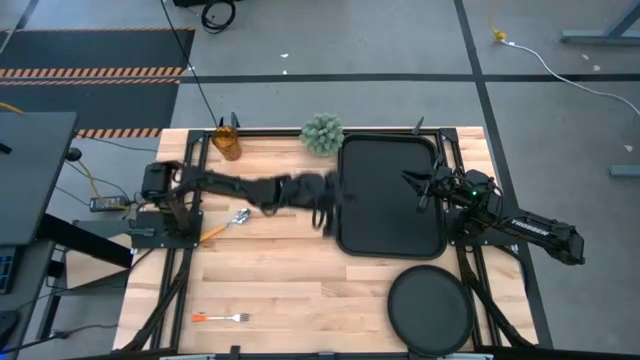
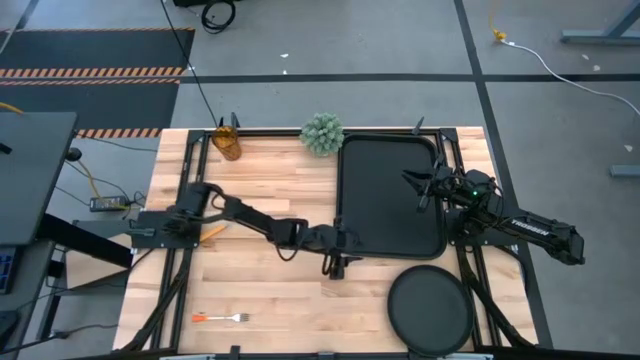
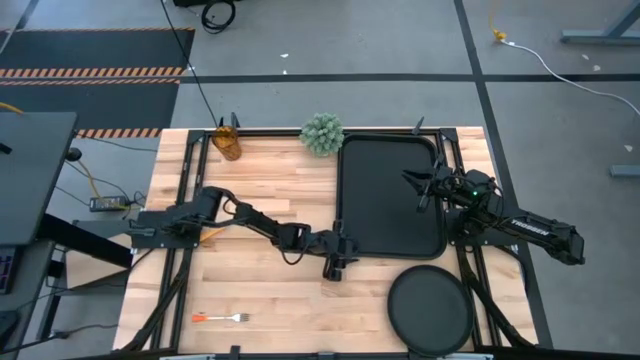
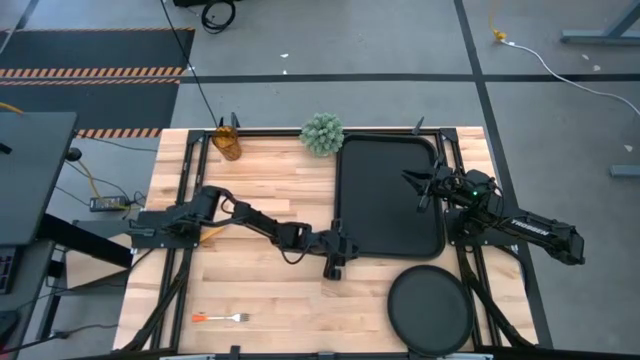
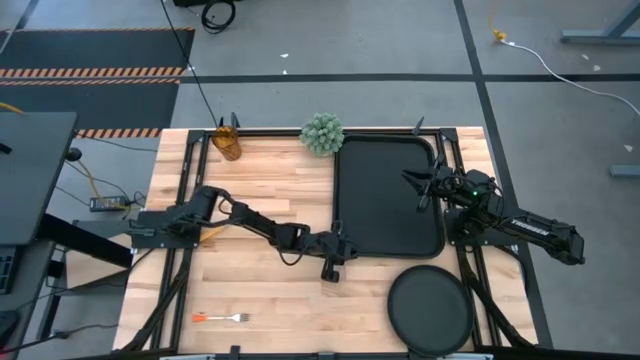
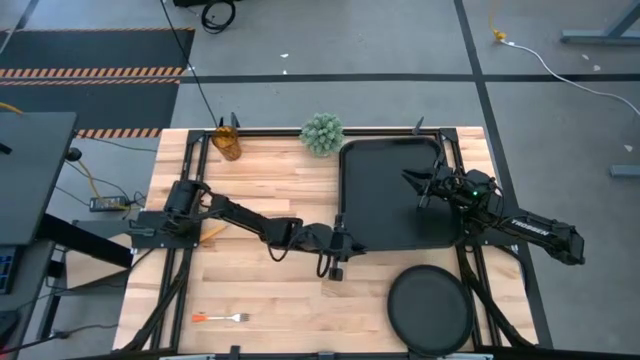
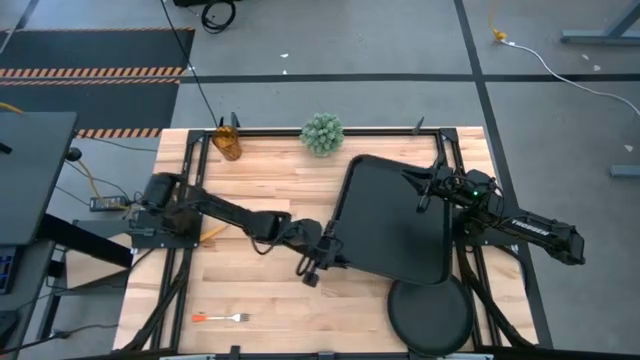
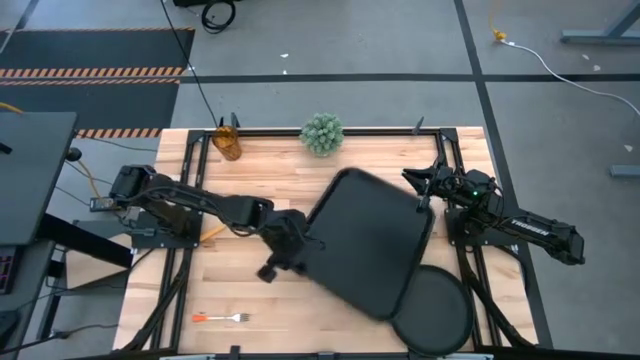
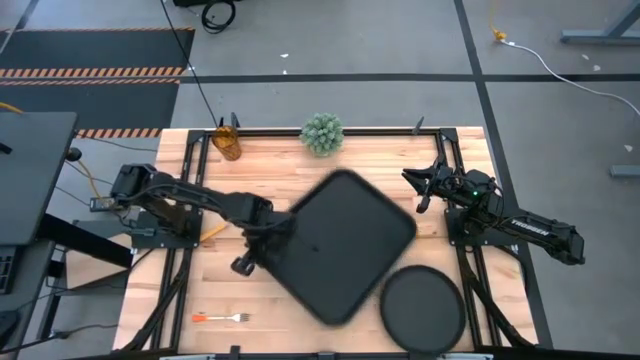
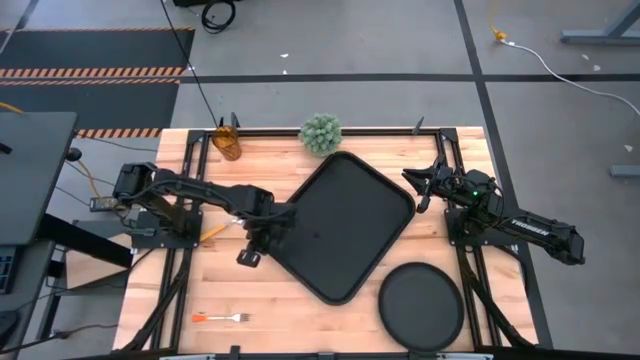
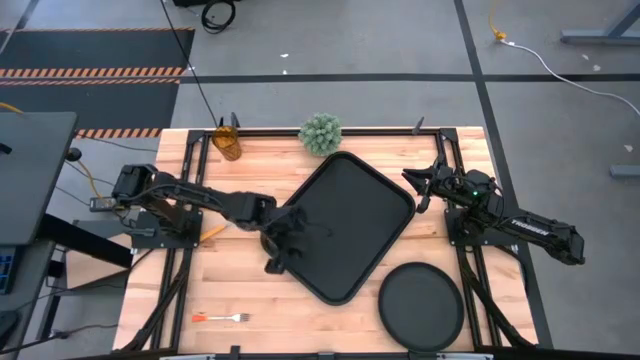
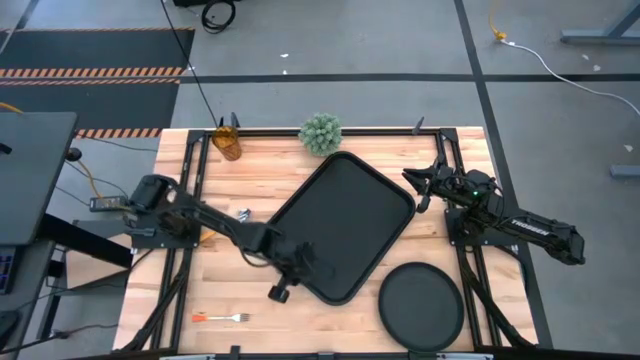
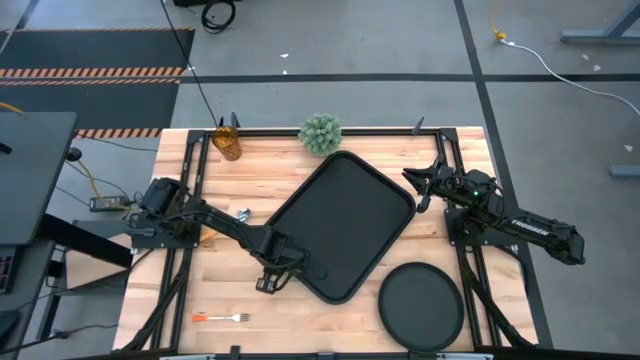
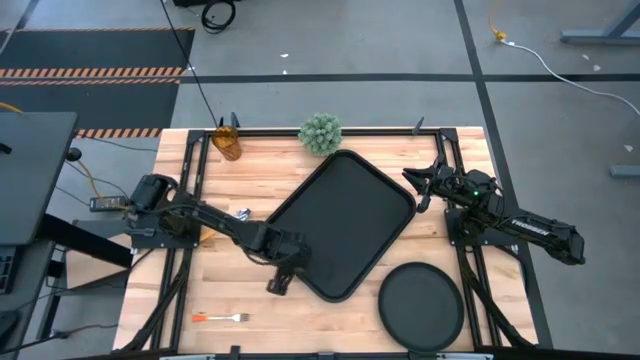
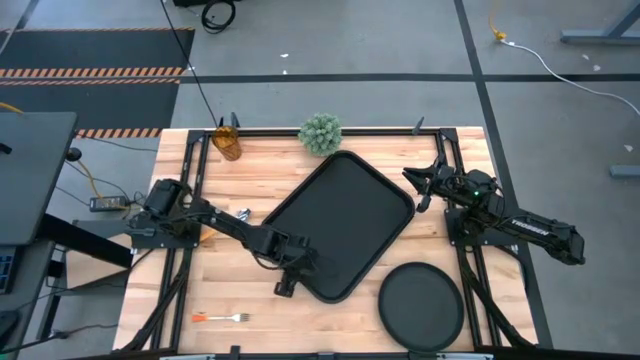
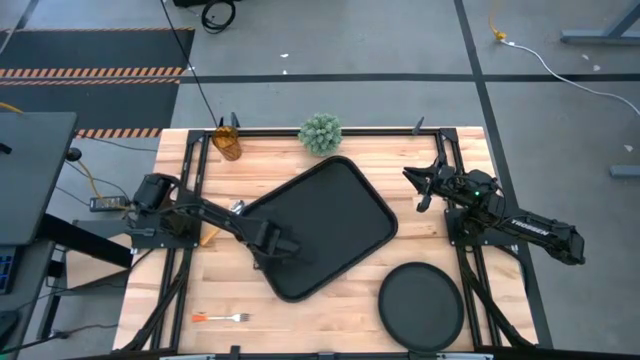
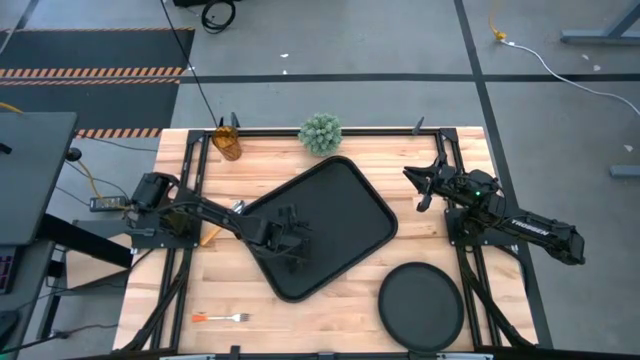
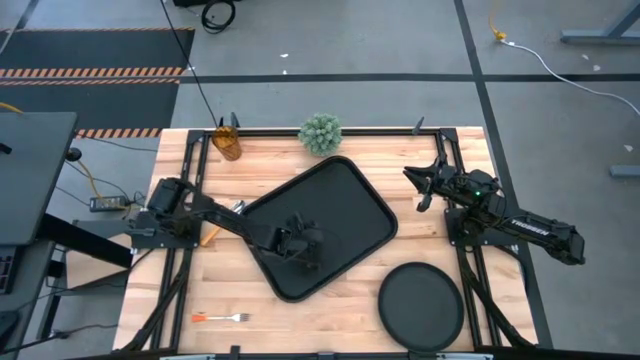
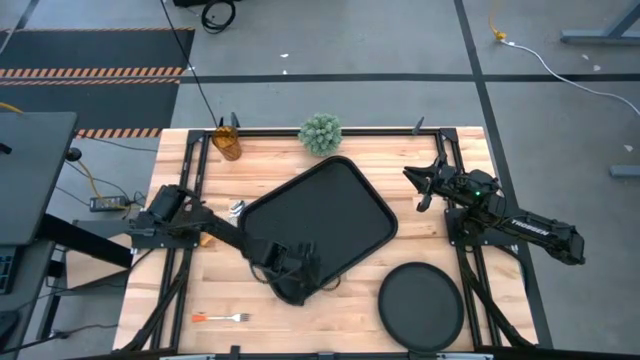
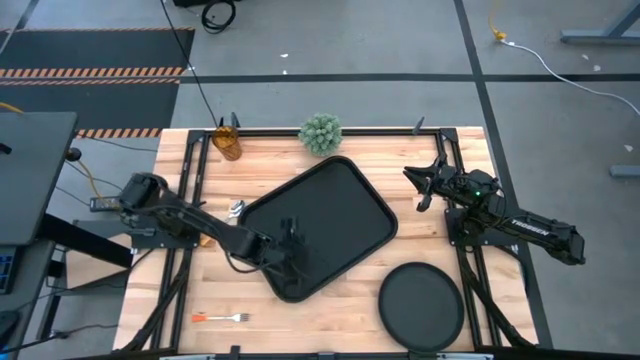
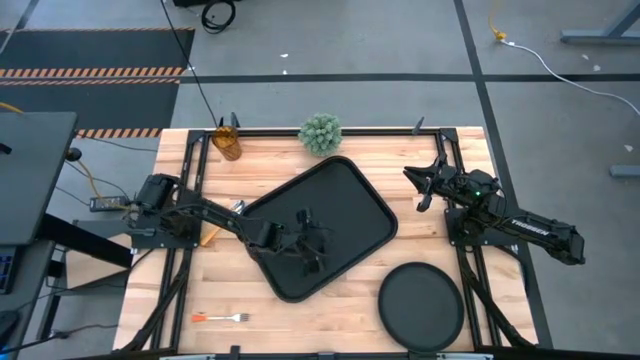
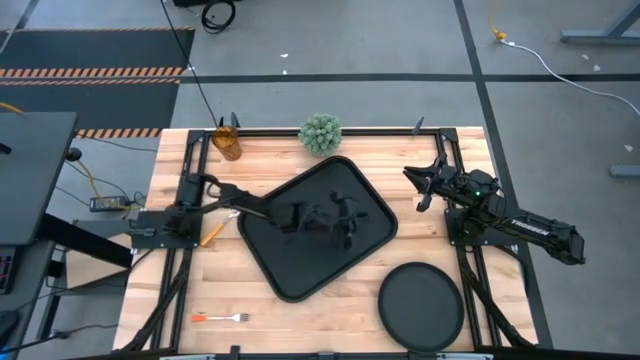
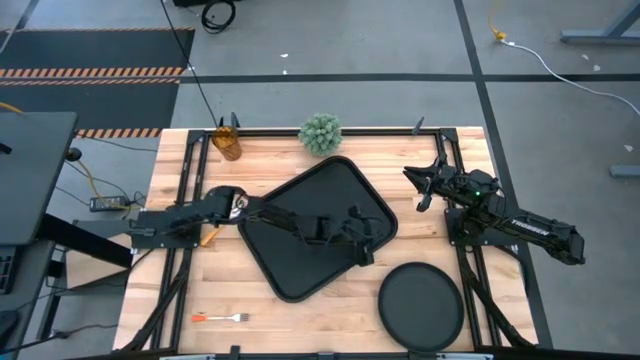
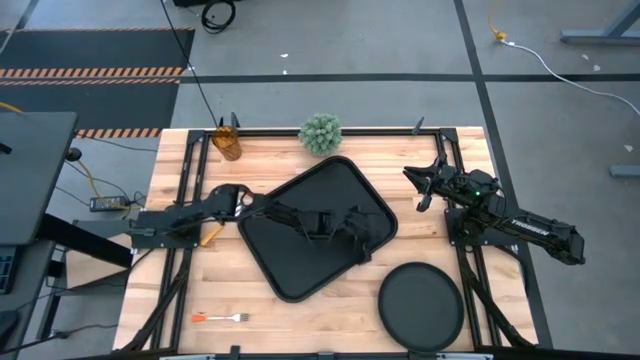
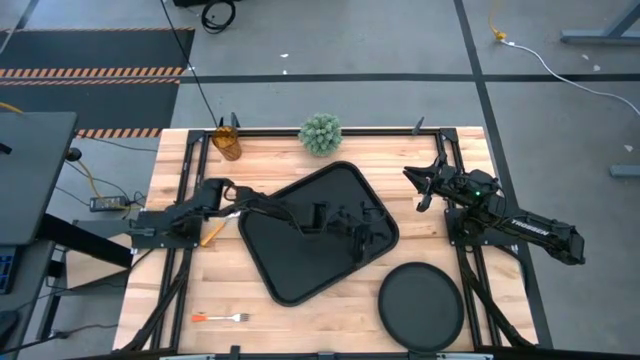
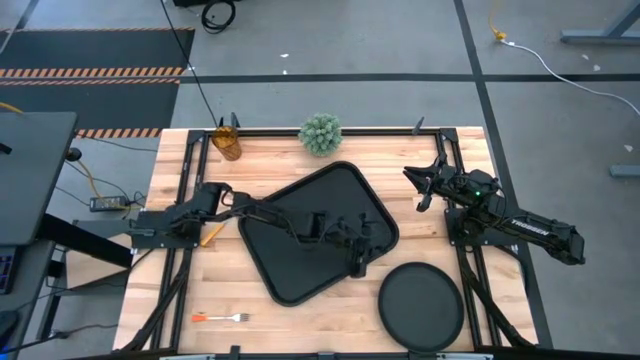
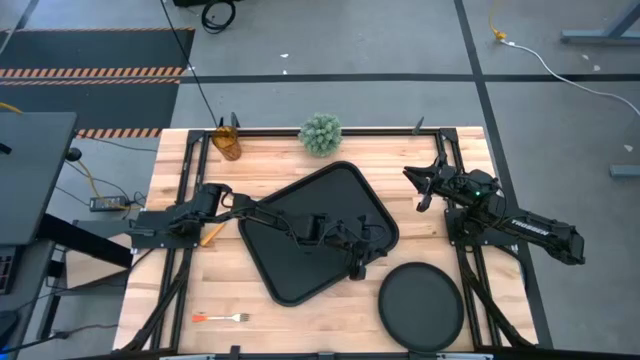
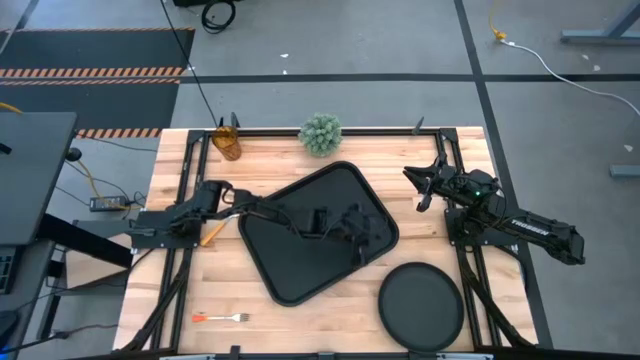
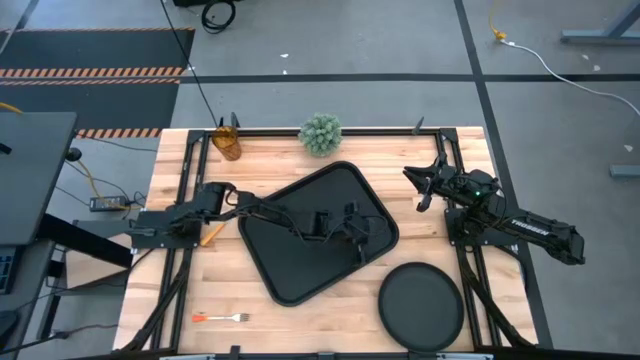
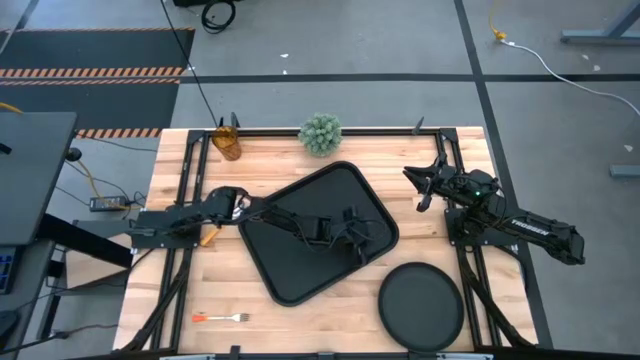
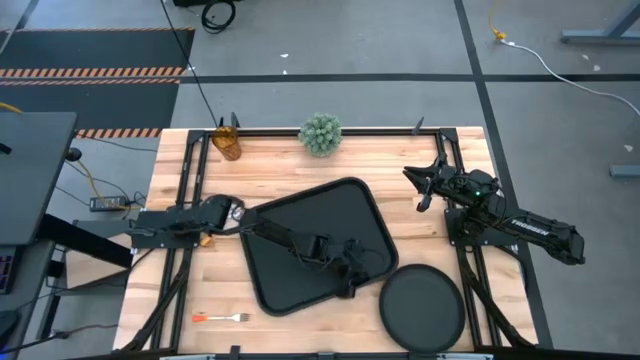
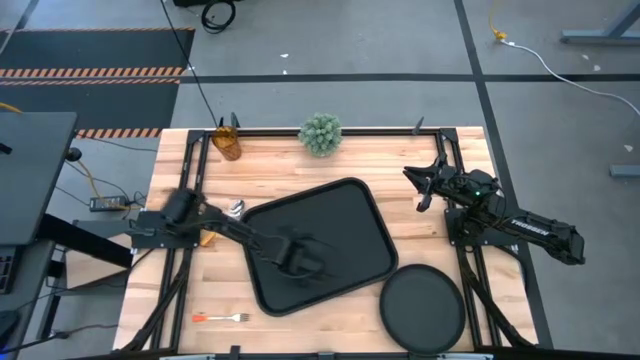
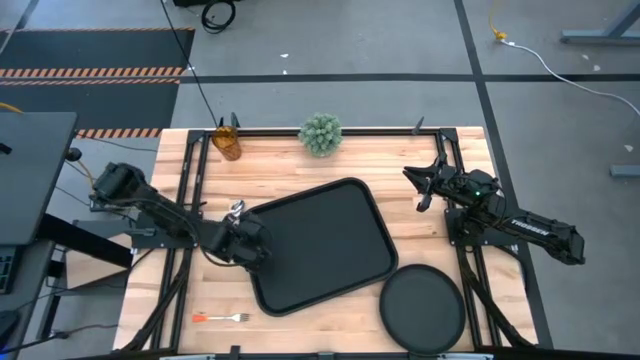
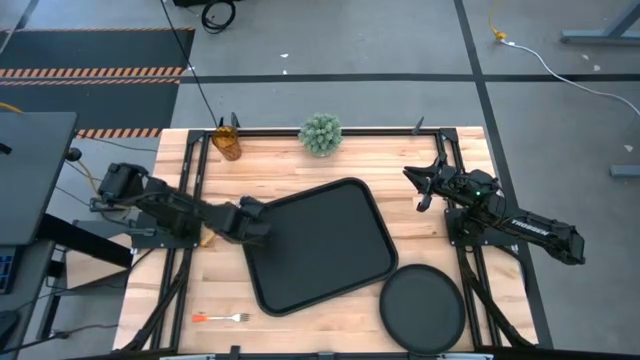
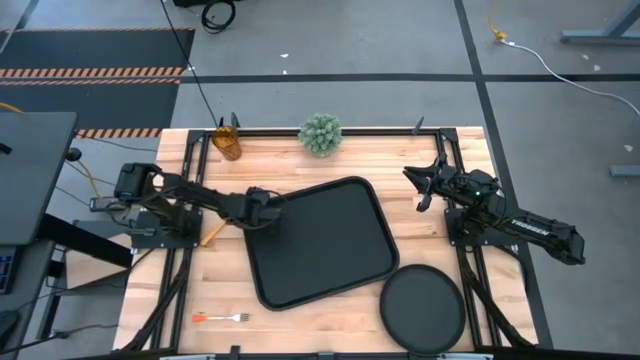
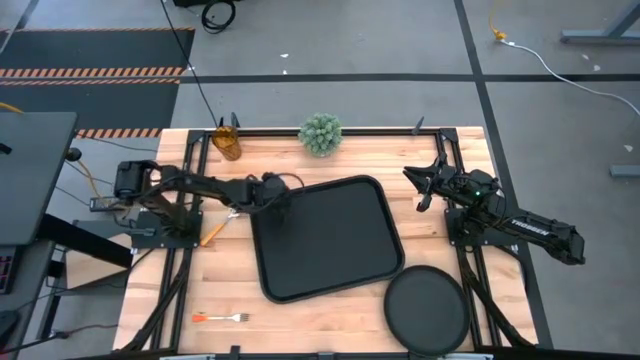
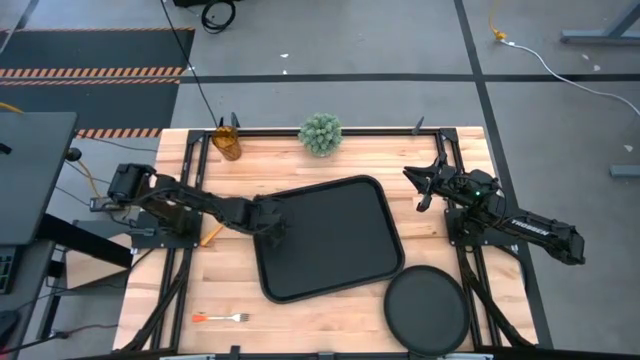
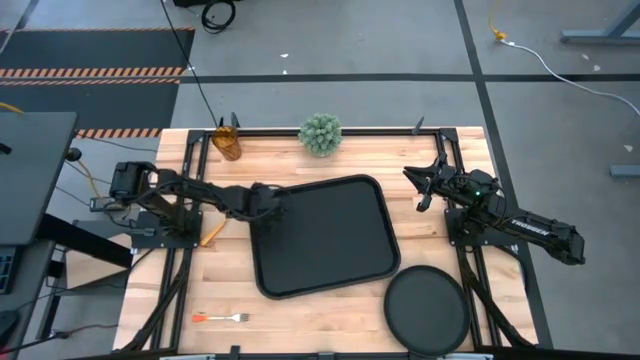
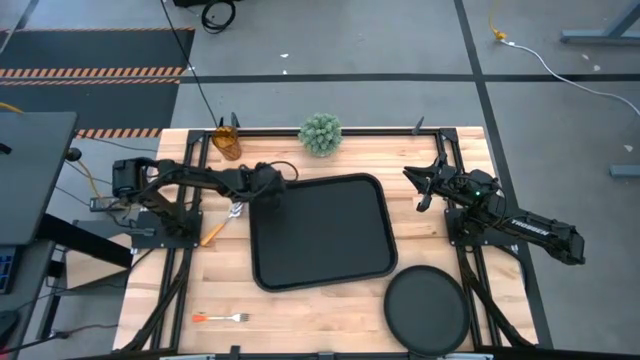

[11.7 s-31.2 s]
Task: Pick and place plate/cup/fork/spoon on tray
Move the black tray to the center of the table

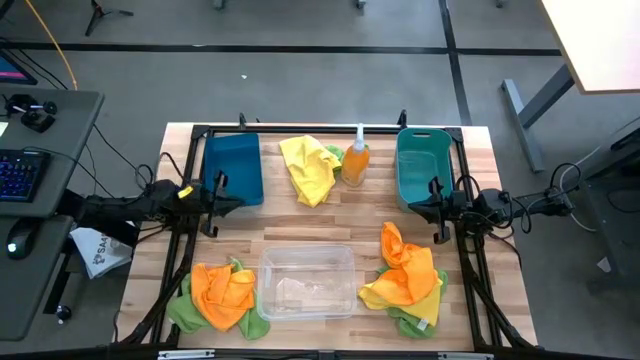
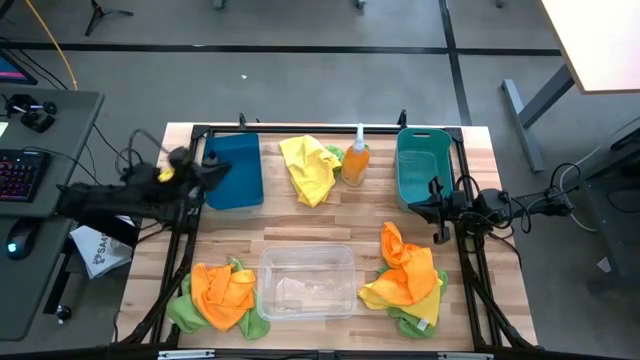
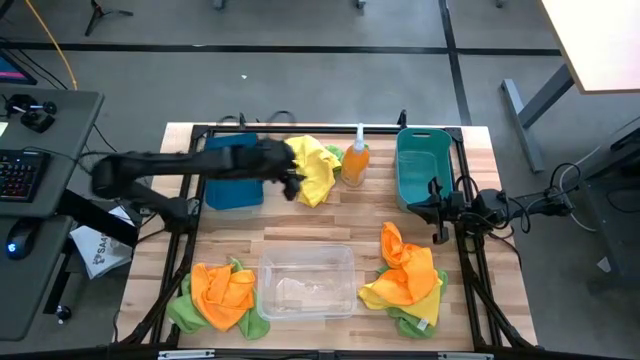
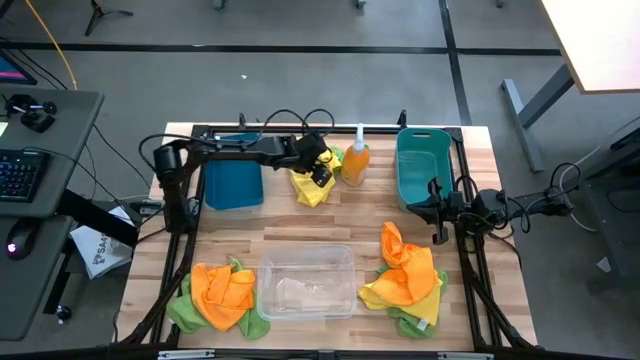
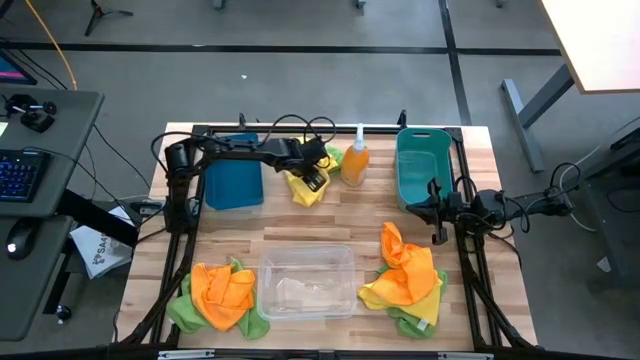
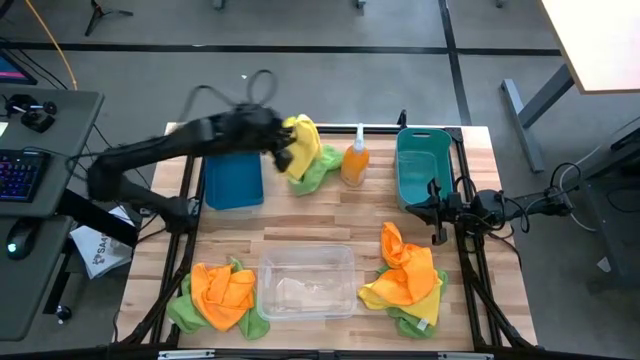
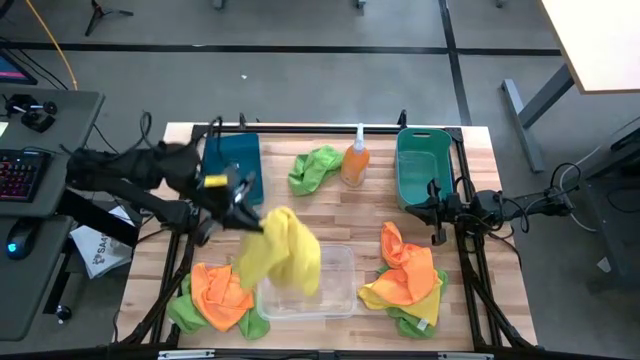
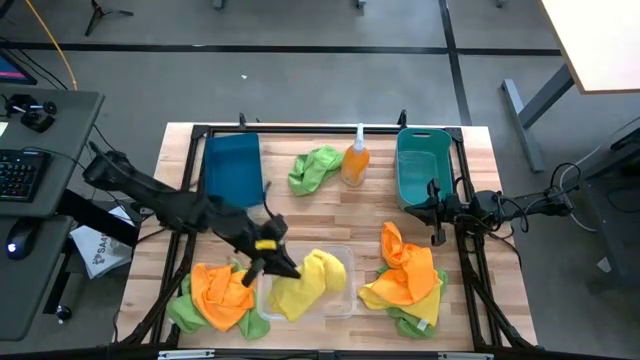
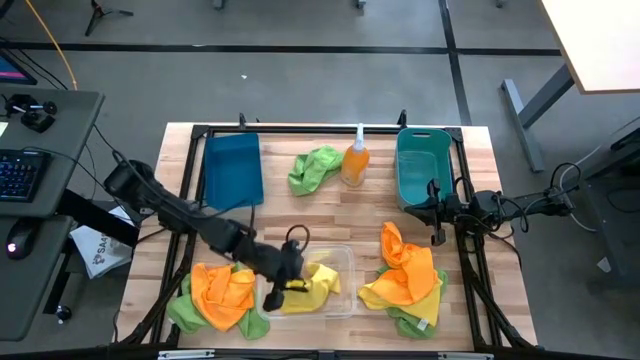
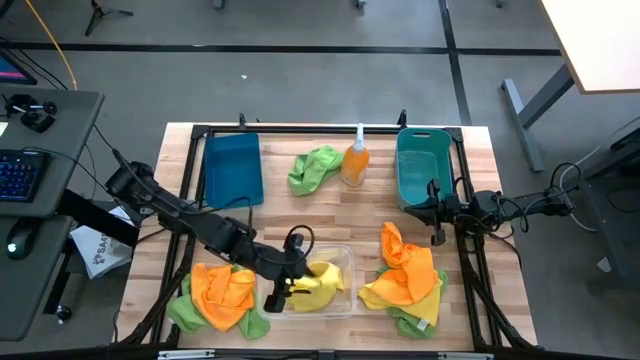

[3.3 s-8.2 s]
Task: Sort microfiber towel by color & place in baskets
Put the top yellow microfiber cloth into the transparent bin
